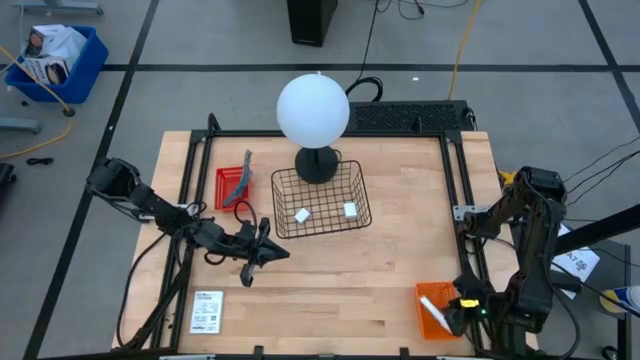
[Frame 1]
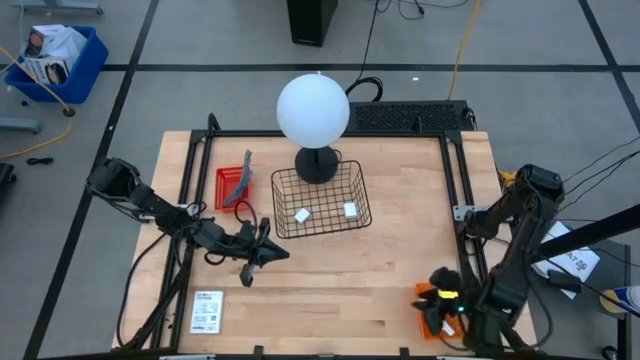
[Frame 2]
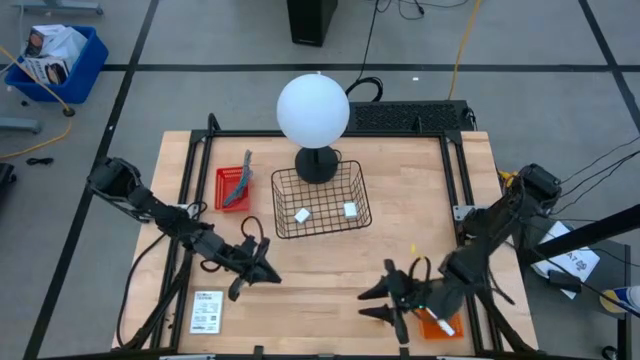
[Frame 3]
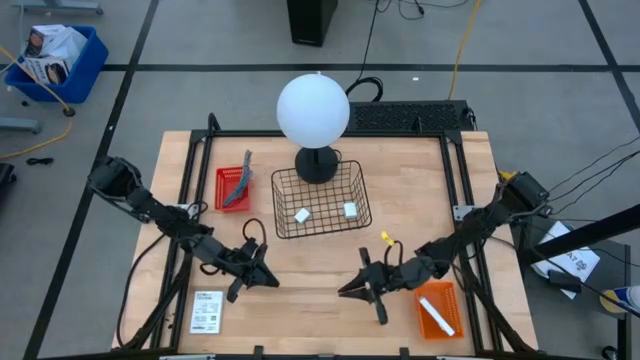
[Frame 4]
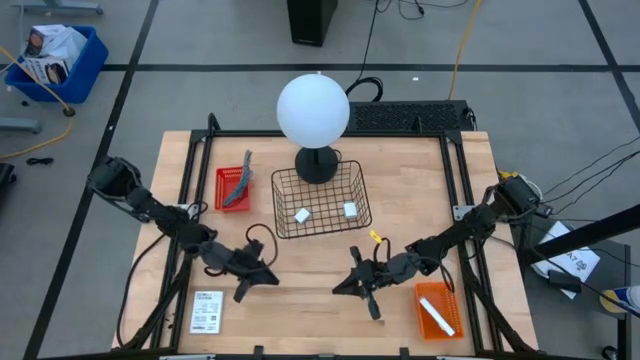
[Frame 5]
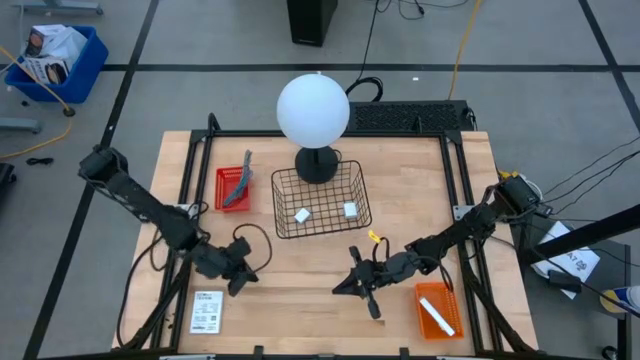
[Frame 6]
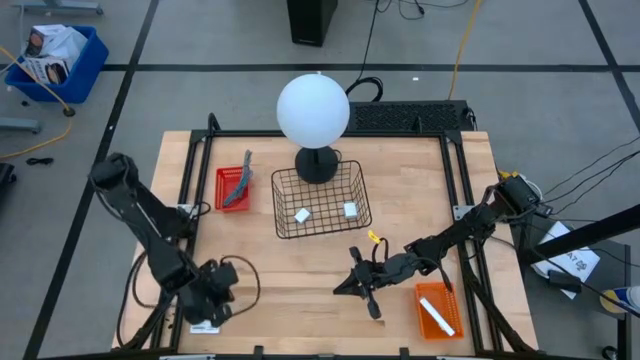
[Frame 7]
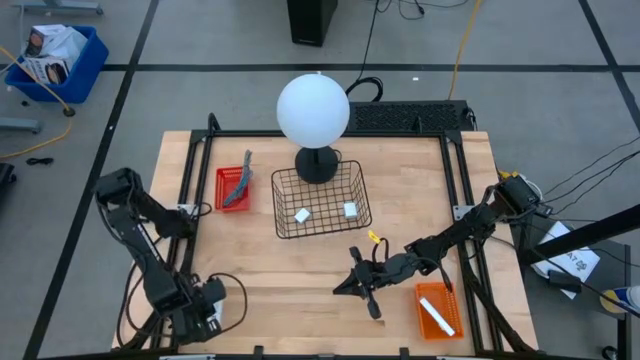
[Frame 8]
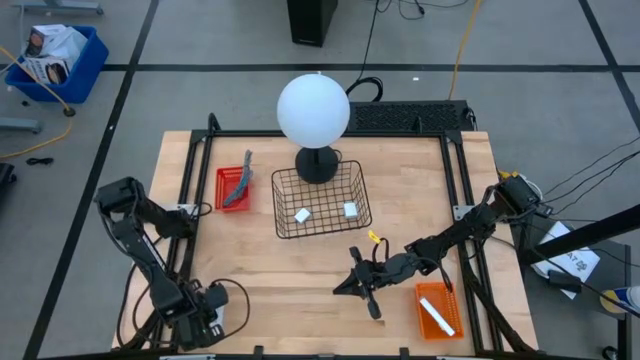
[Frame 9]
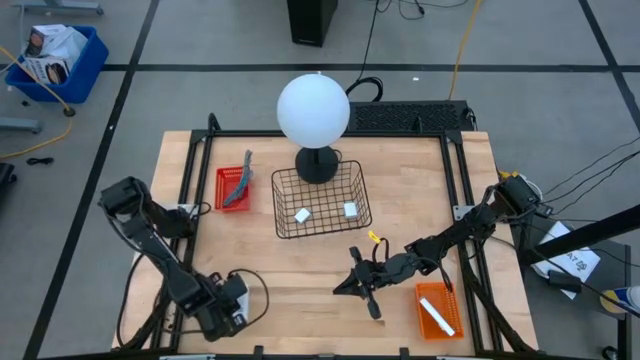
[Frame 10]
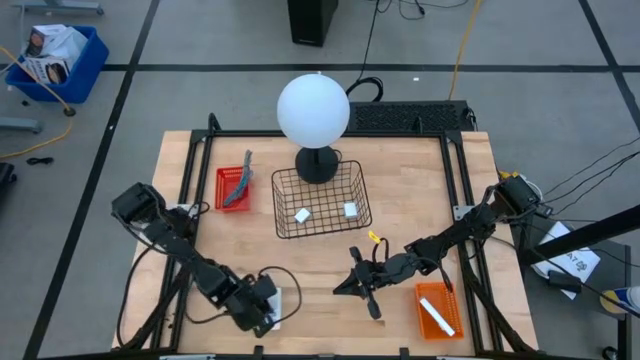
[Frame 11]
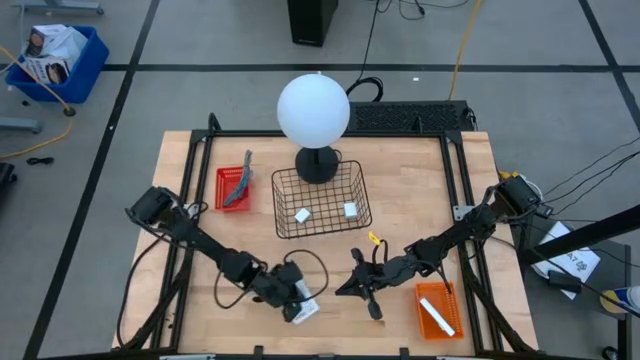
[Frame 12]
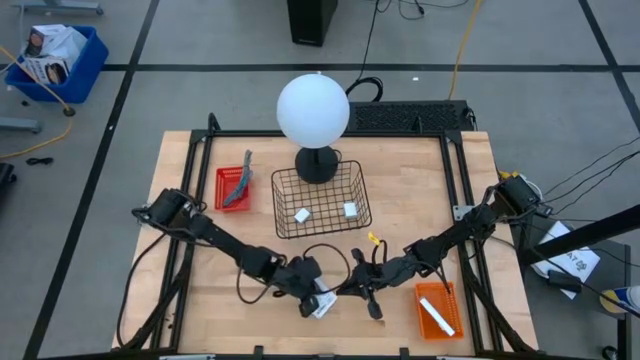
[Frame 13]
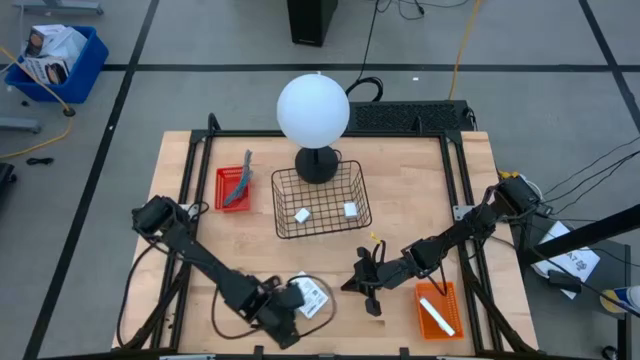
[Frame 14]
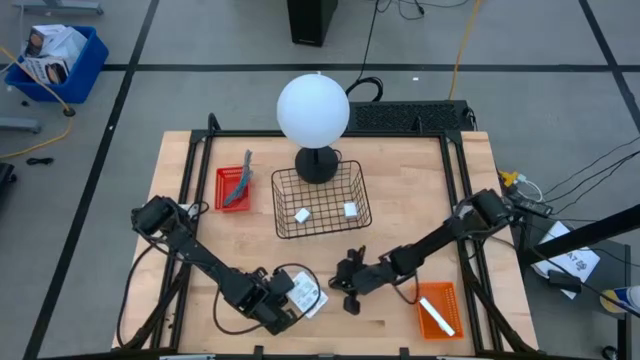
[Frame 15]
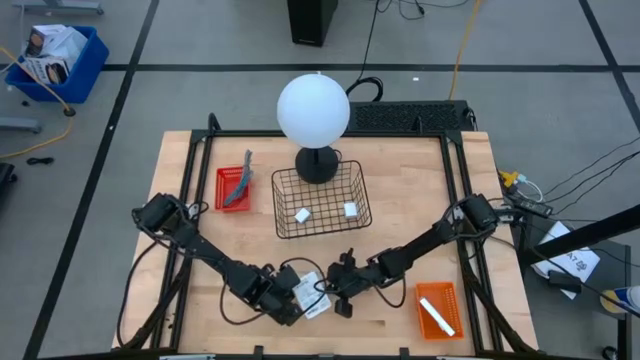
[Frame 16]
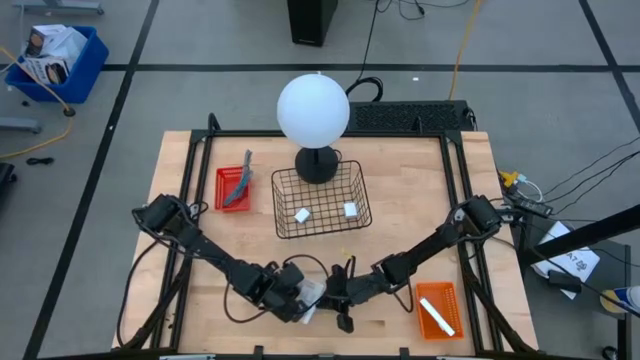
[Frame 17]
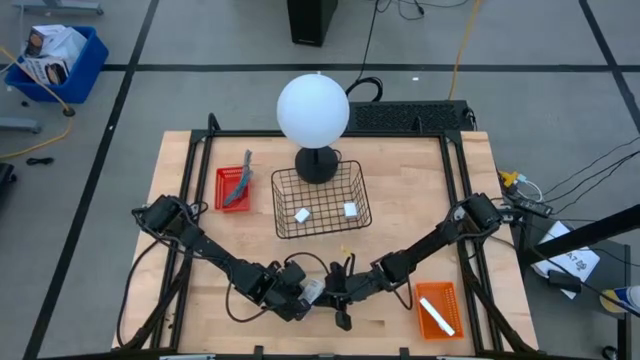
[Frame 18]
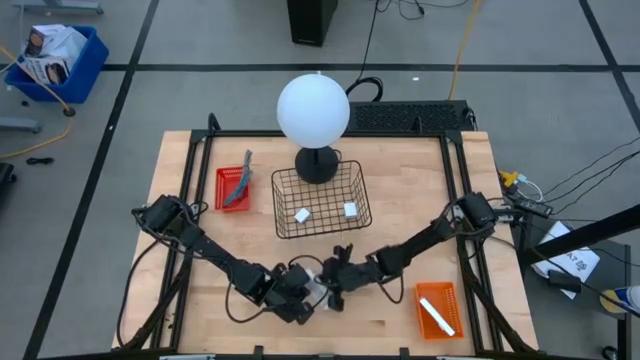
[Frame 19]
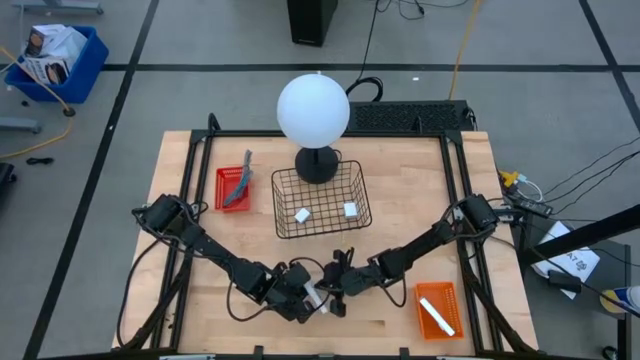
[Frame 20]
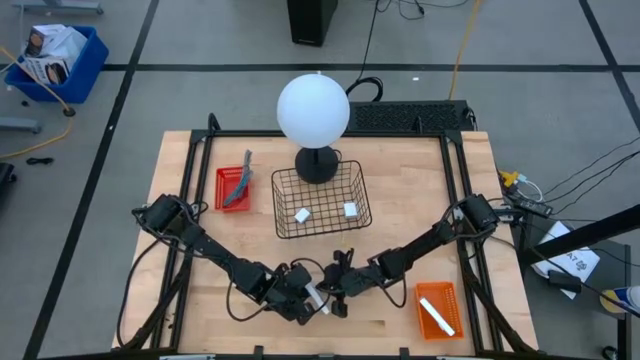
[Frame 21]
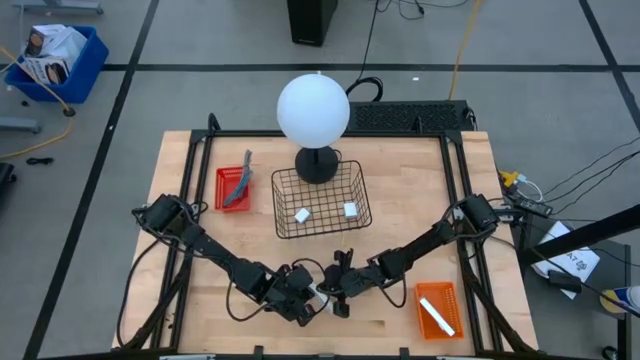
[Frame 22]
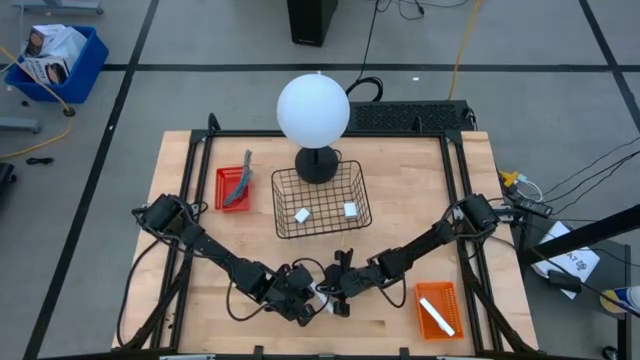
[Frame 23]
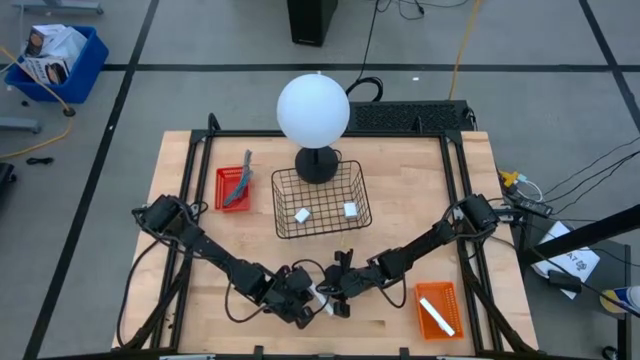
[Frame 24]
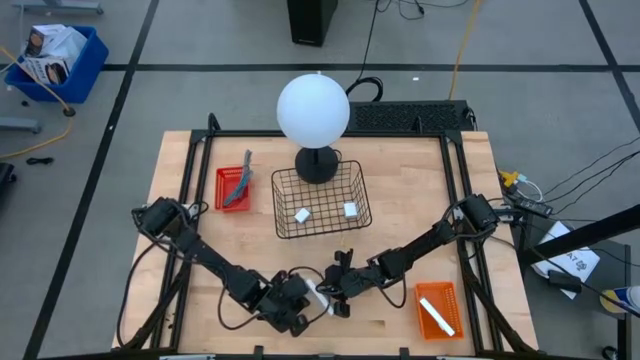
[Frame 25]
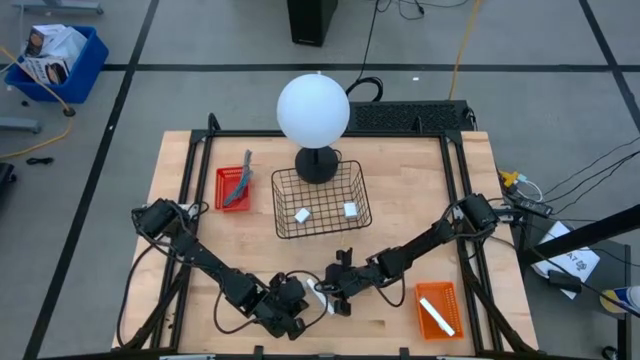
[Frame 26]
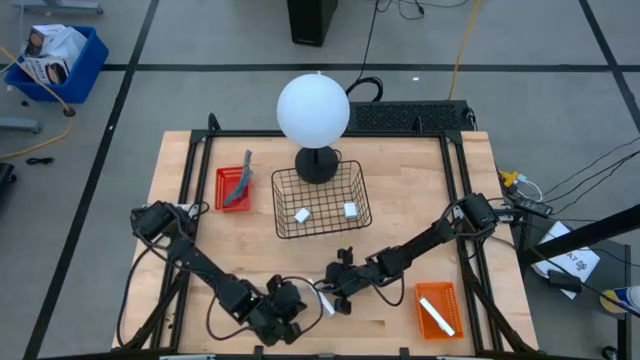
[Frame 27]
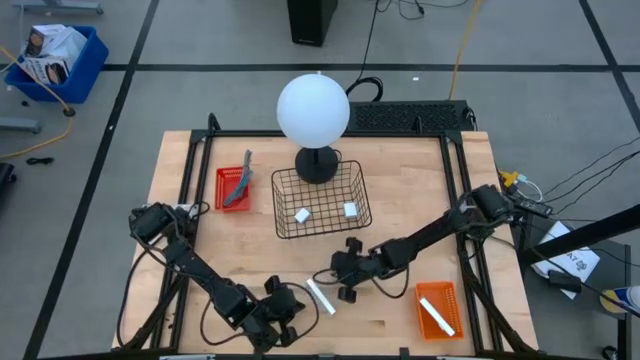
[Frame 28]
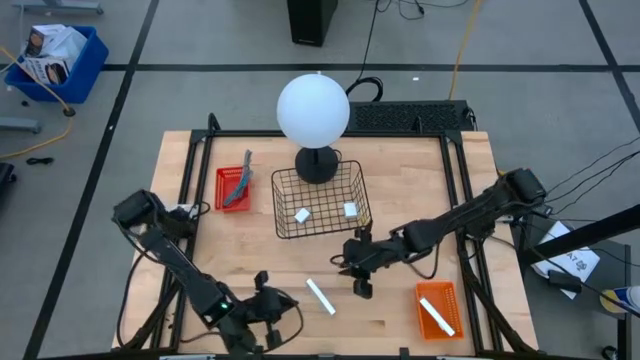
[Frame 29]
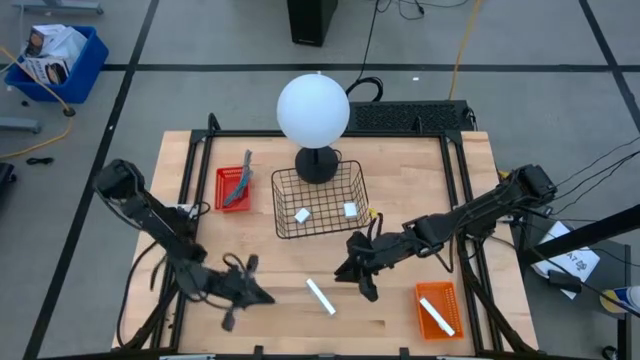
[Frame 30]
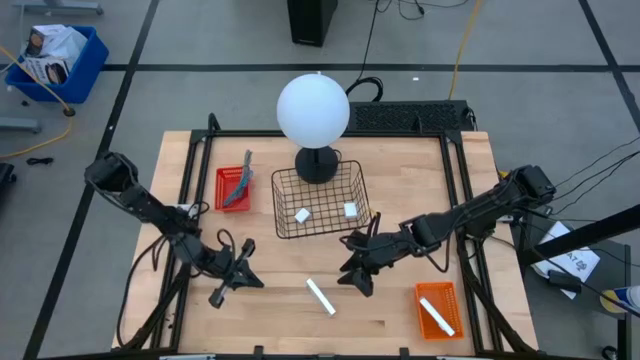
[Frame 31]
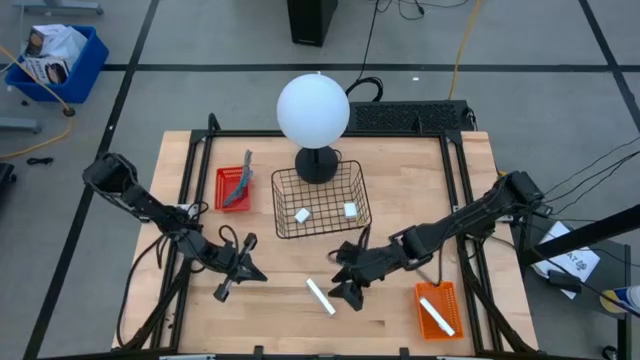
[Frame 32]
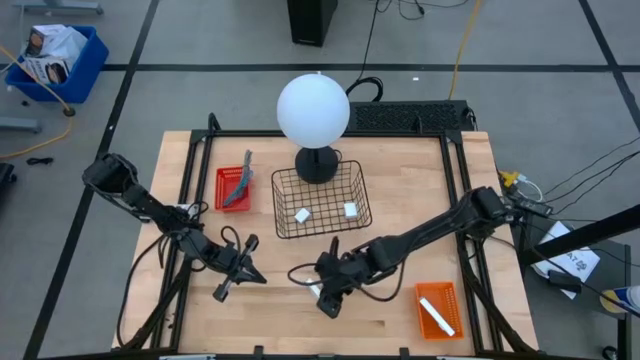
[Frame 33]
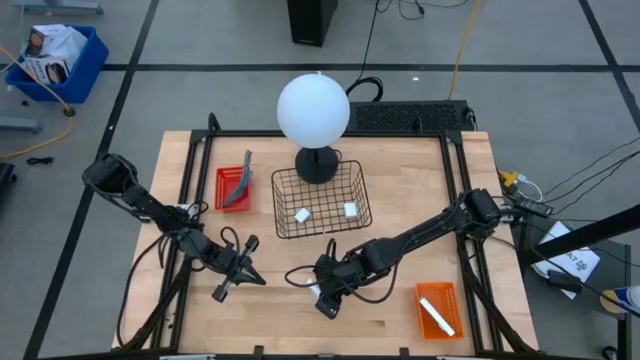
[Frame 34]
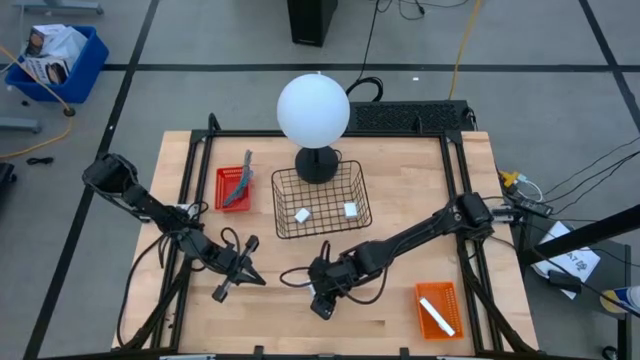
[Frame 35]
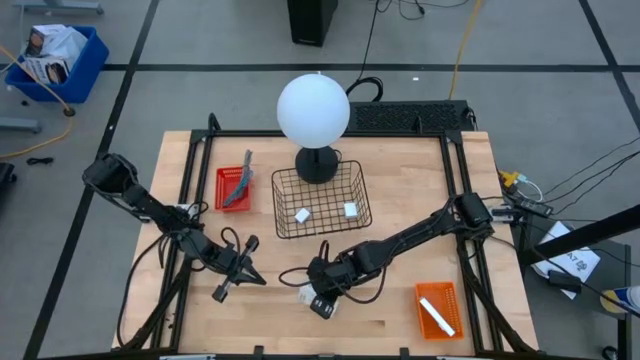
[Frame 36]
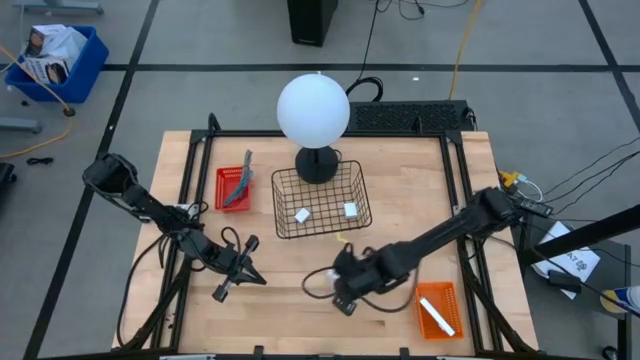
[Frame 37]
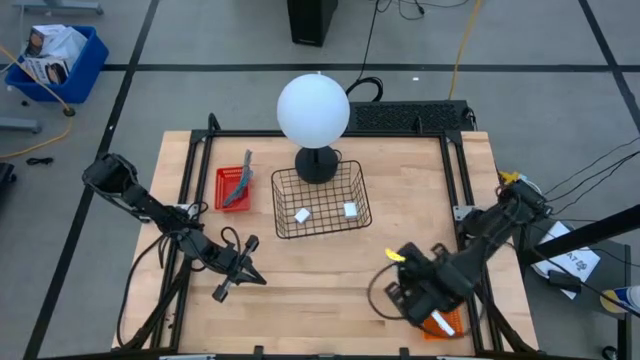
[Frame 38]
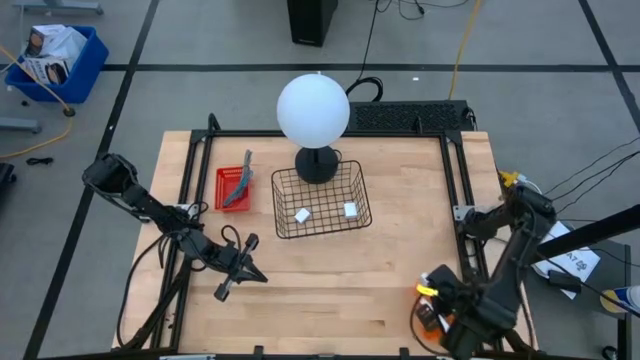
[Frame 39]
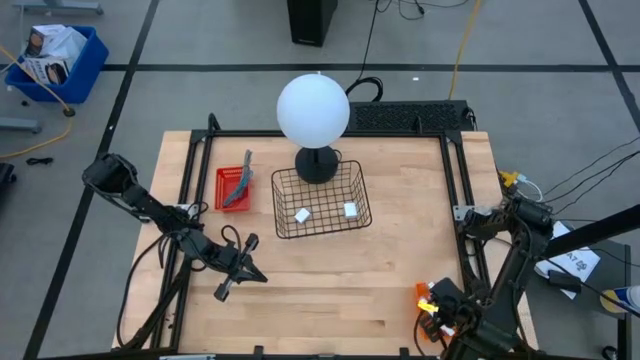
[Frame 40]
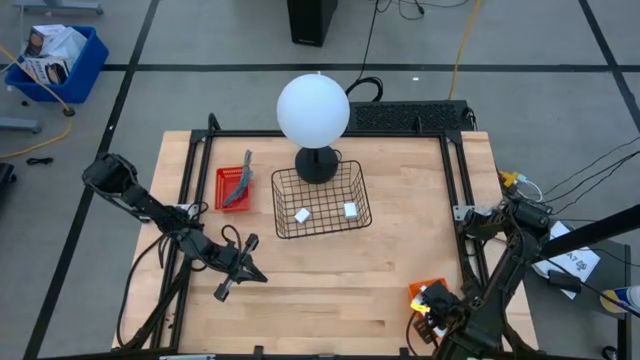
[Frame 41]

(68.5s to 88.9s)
Task: Pick and place items into bin
Put the white card reader box into the orange bin

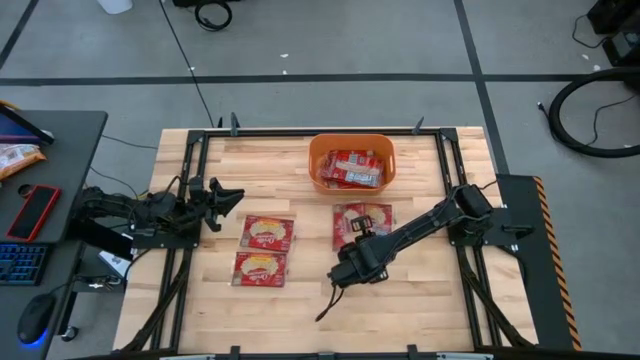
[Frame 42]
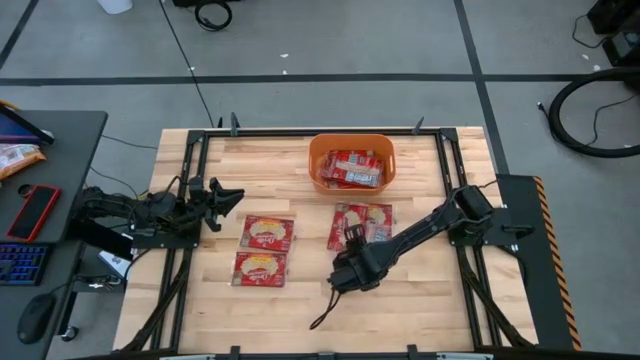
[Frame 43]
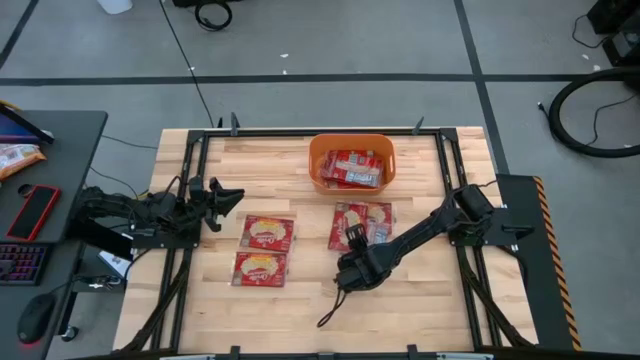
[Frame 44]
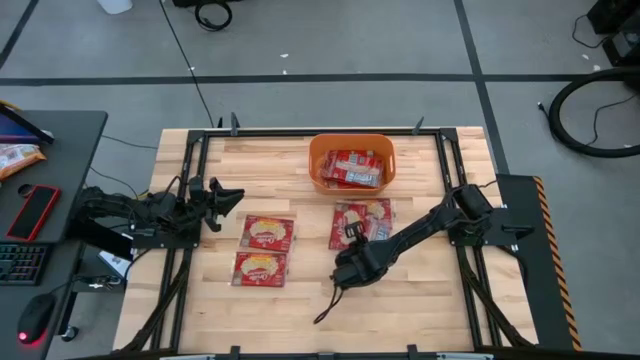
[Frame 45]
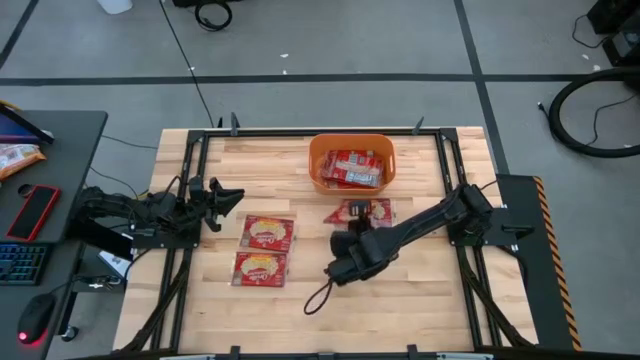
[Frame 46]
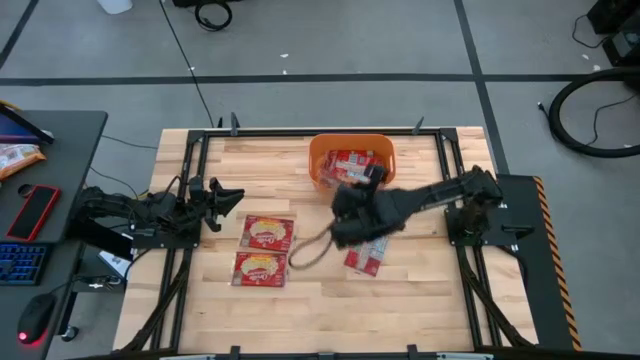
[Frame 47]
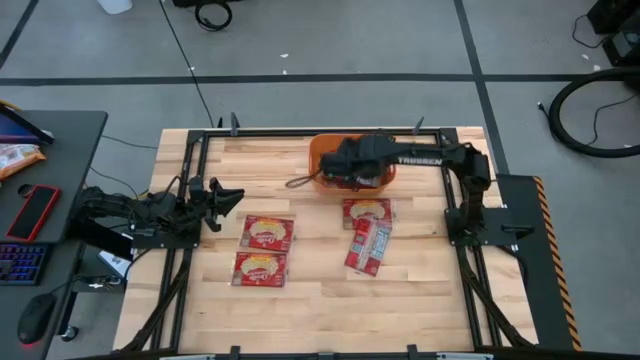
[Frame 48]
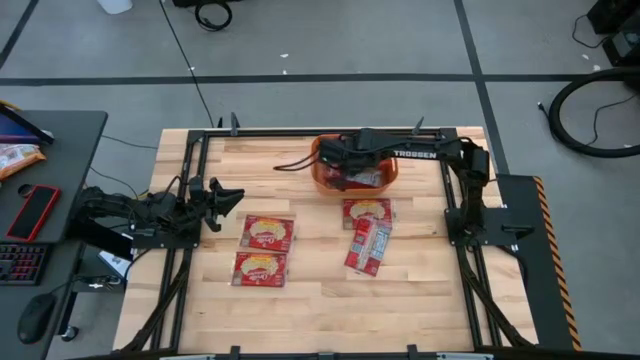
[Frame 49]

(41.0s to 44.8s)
Task: Sort popcorn bags into baskets
Stack the popcorn bag on top of the other popcorn bag into the orange container
